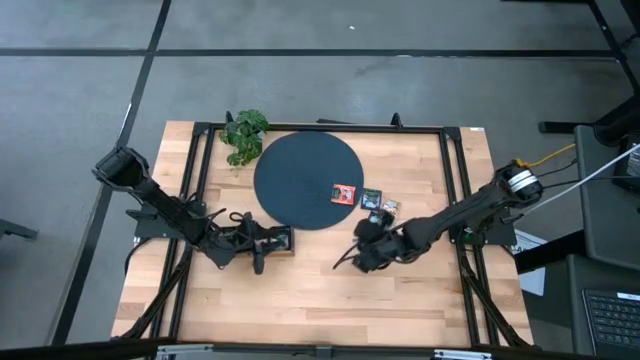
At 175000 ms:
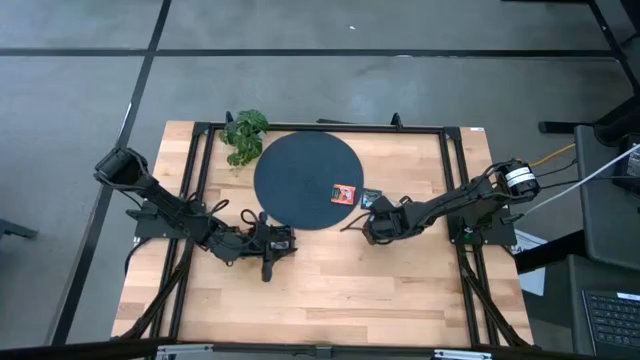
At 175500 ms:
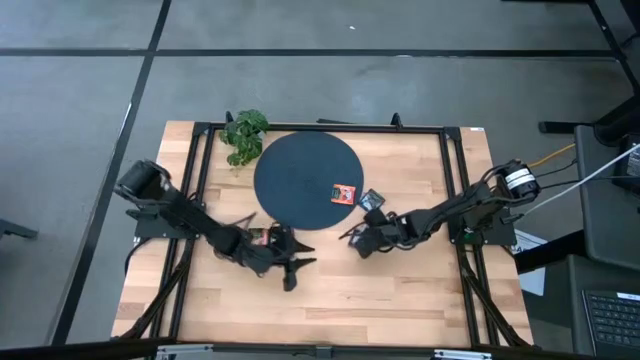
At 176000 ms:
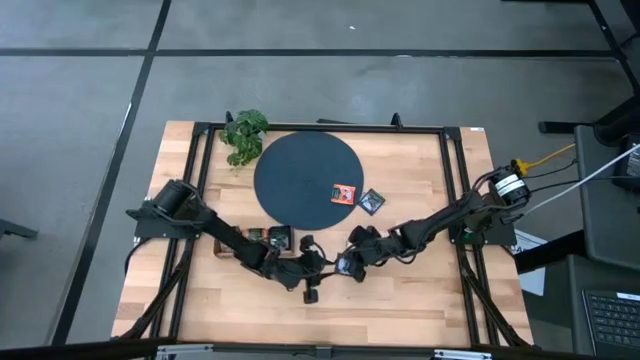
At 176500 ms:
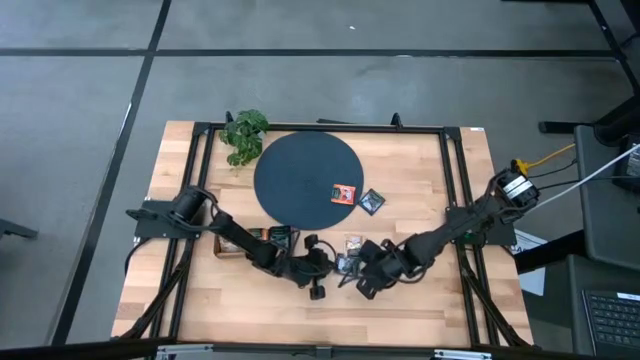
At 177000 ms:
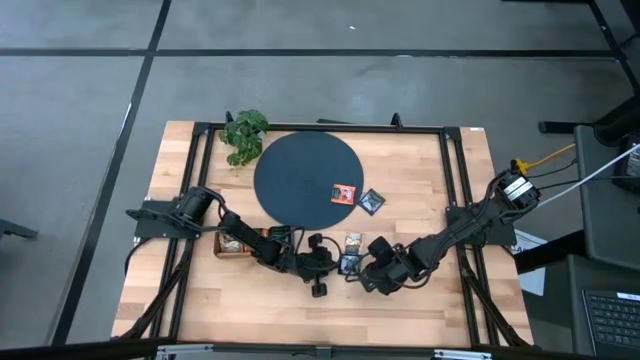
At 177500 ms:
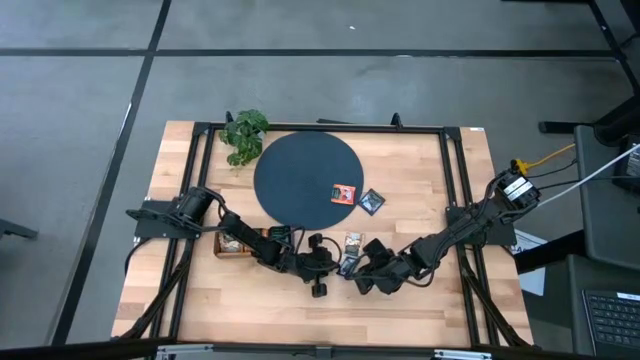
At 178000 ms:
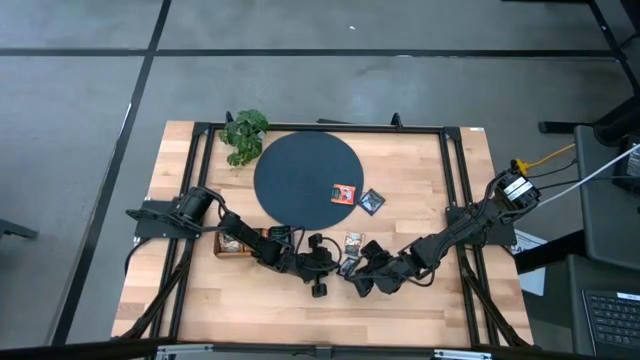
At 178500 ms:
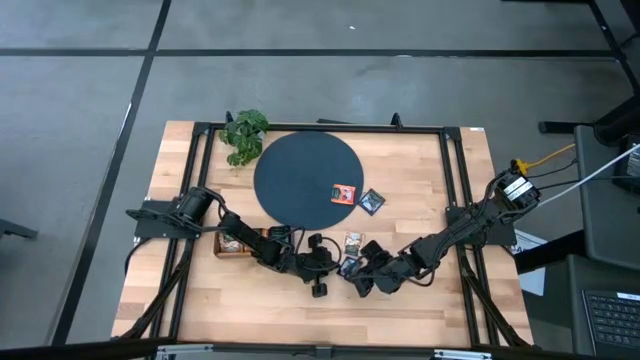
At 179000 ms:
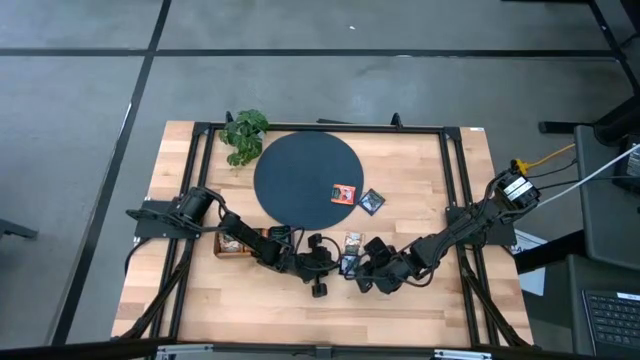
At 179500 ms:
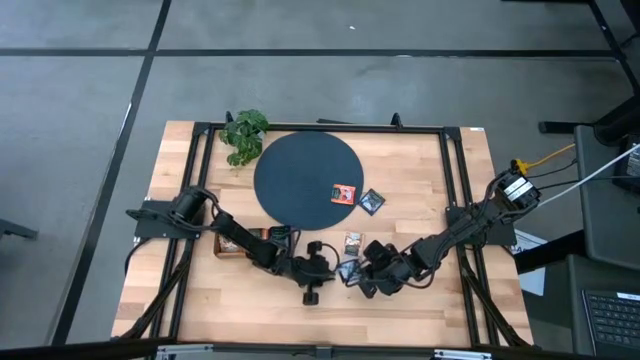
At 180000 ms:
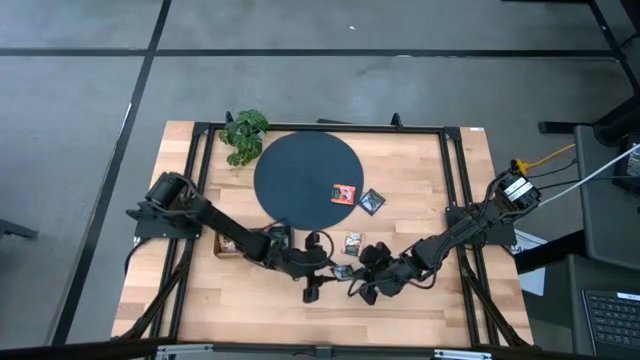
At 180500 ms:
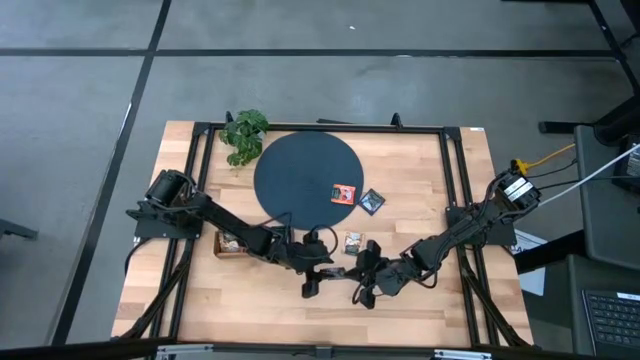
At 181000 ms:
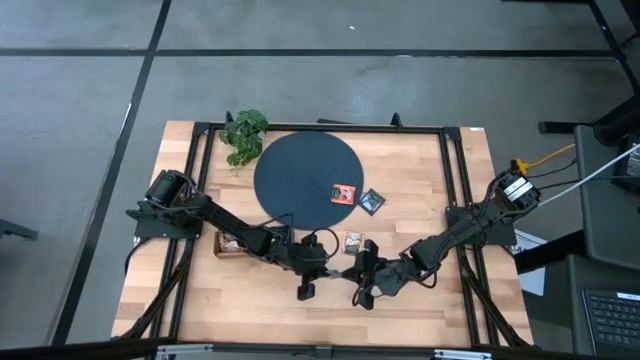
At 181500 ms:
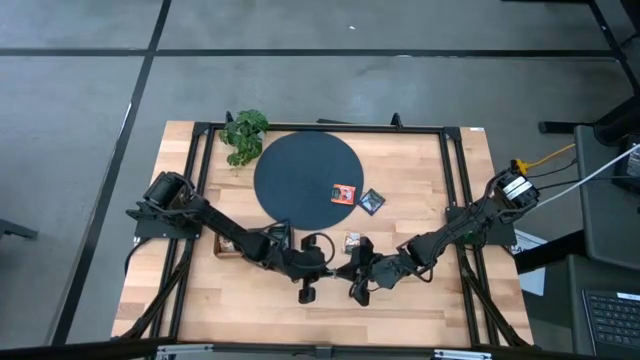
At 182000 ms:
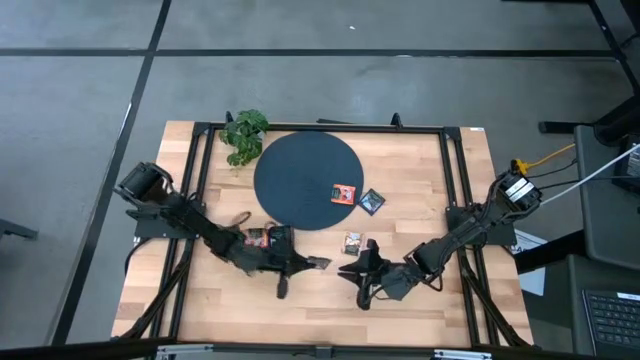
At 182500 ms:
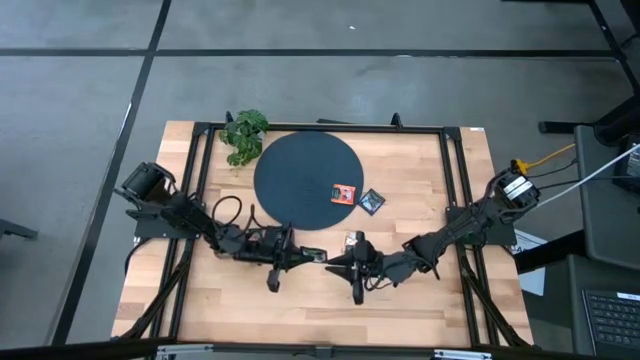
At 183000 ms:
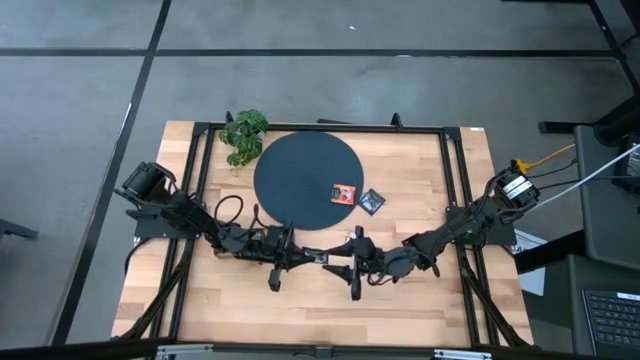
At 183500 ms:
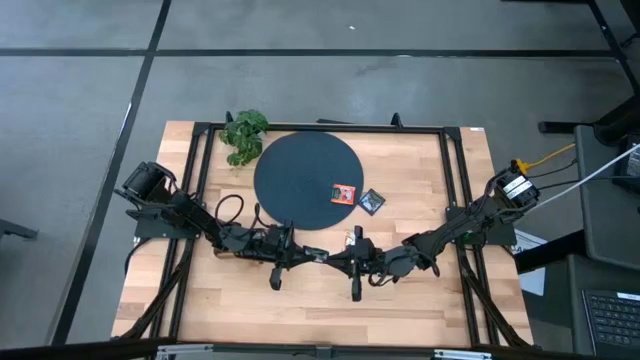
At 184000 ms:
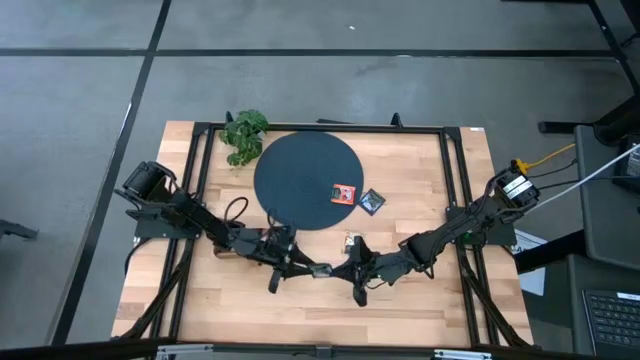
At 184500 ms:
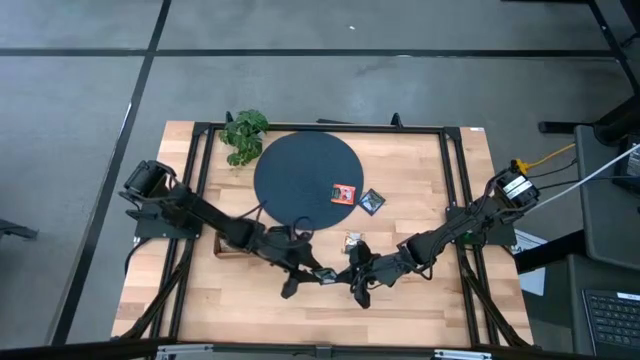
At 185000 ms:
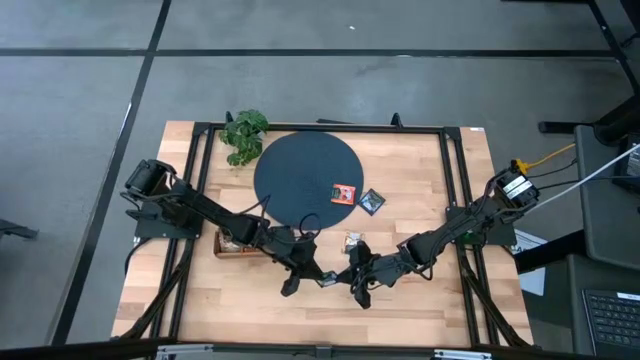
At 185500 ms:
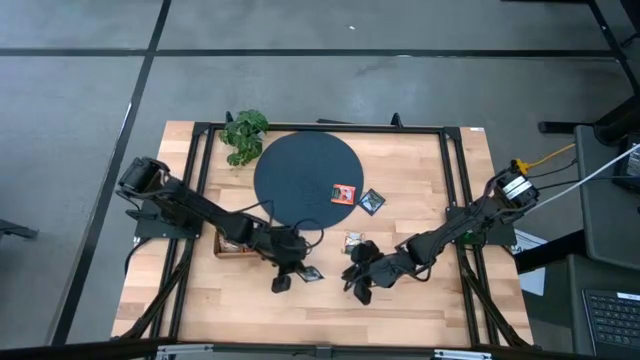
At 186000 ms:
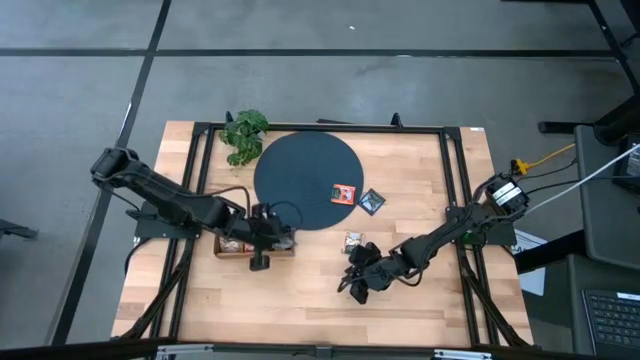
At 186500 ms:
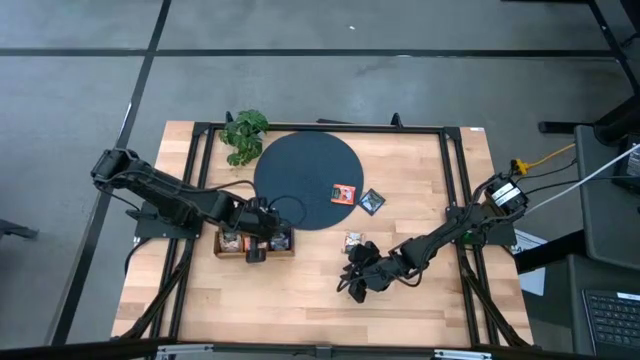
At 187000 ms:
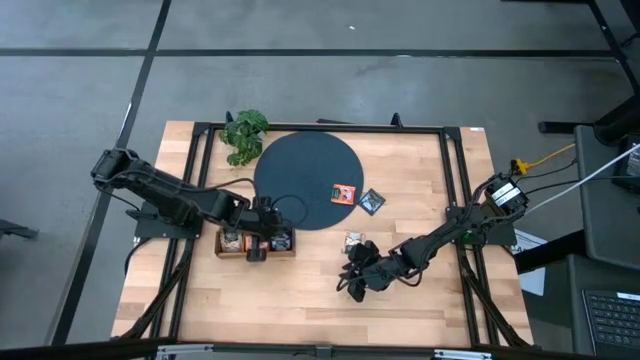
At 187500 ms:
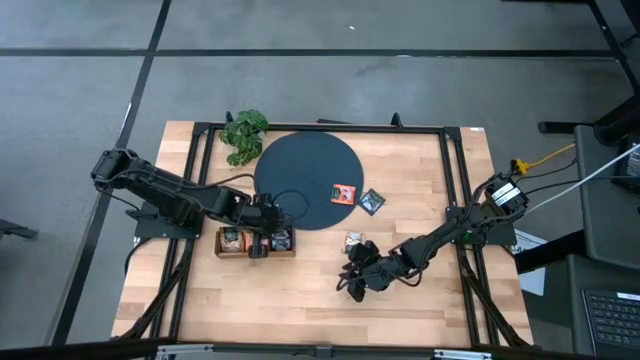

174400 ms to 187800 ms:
Task: Pick & Place Tea
Put the purple tea bag into the right section of the wooden organizer

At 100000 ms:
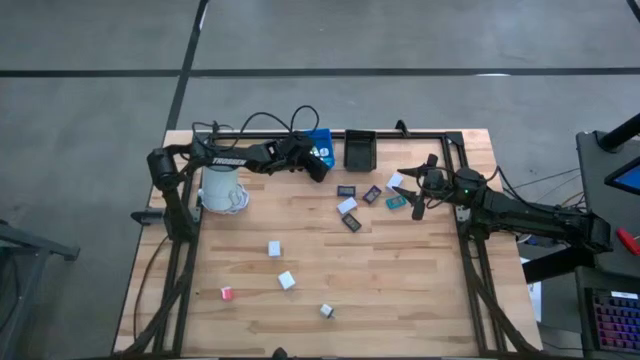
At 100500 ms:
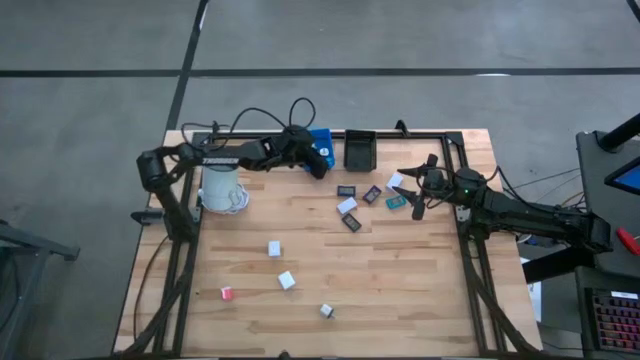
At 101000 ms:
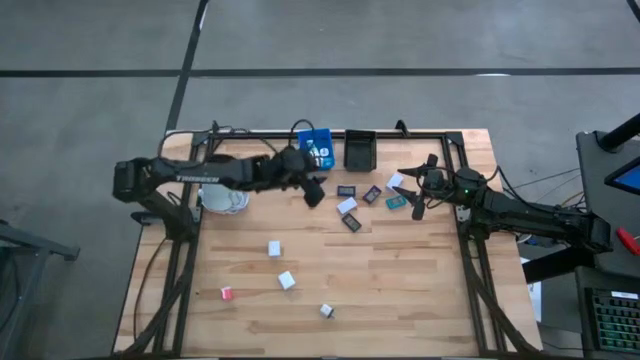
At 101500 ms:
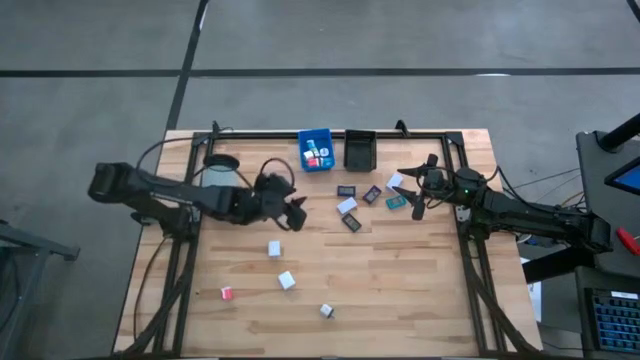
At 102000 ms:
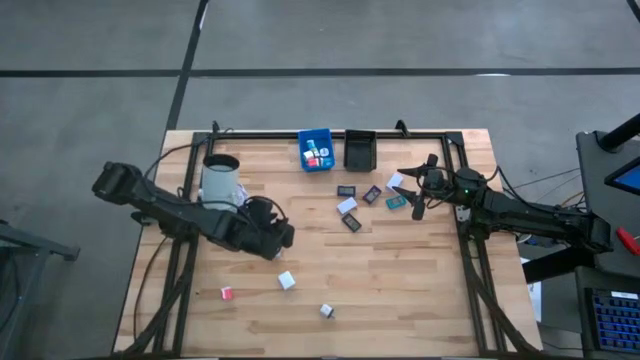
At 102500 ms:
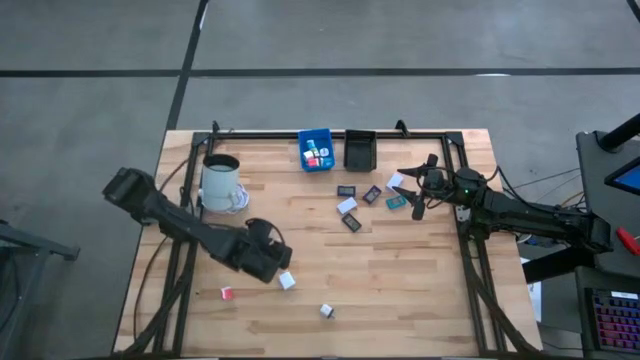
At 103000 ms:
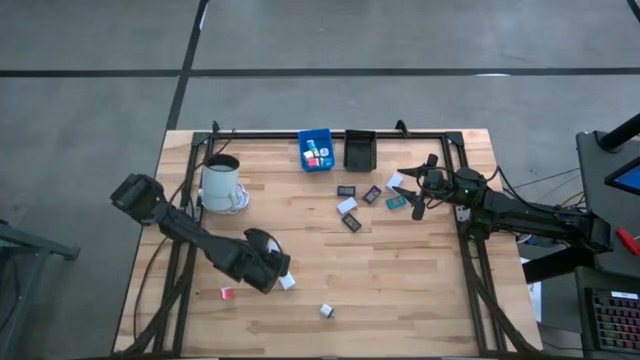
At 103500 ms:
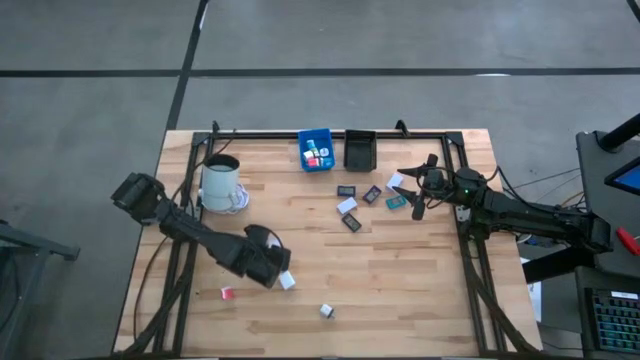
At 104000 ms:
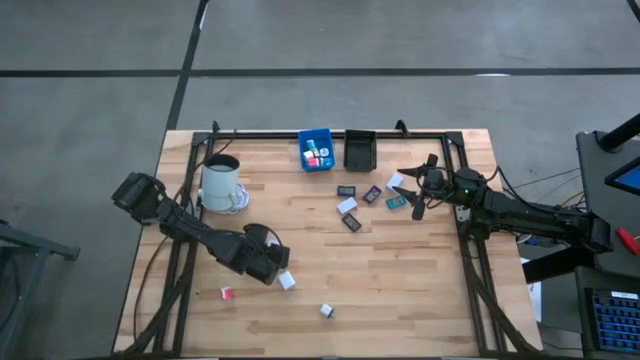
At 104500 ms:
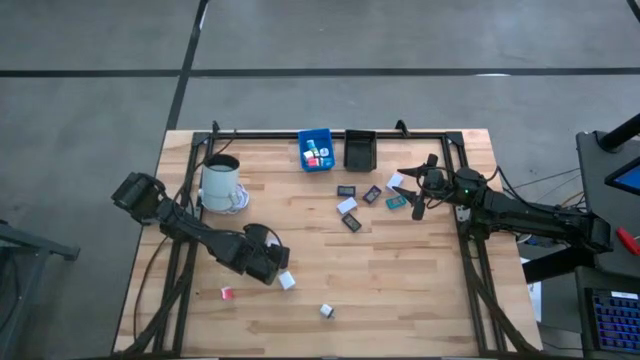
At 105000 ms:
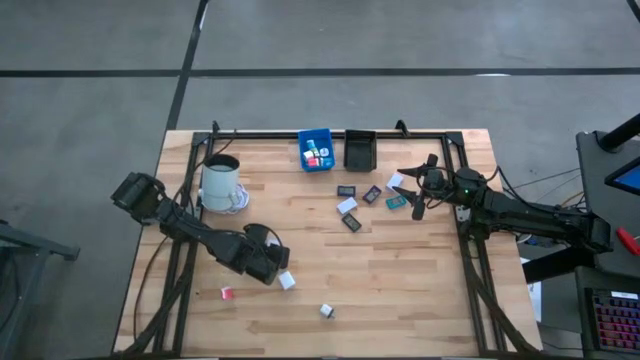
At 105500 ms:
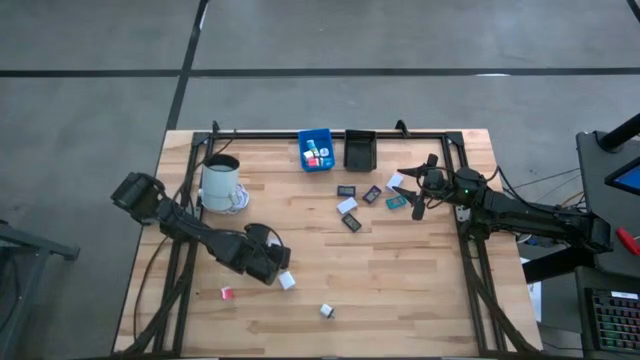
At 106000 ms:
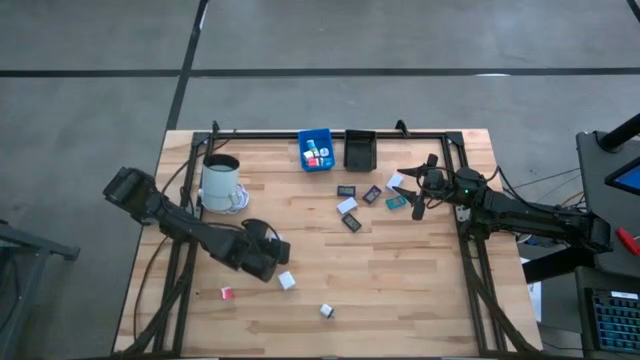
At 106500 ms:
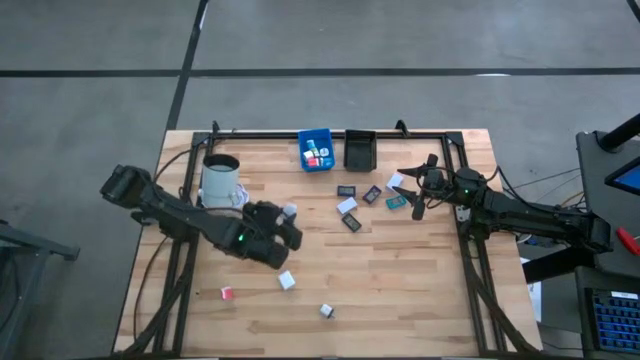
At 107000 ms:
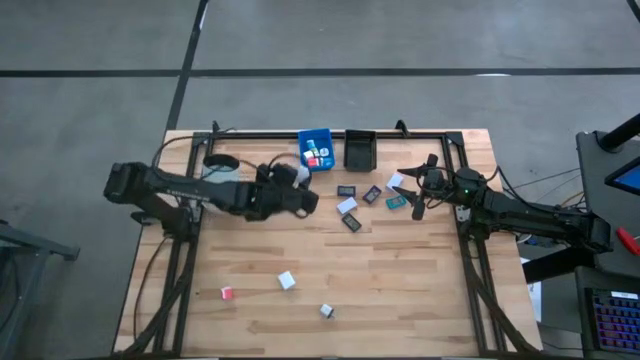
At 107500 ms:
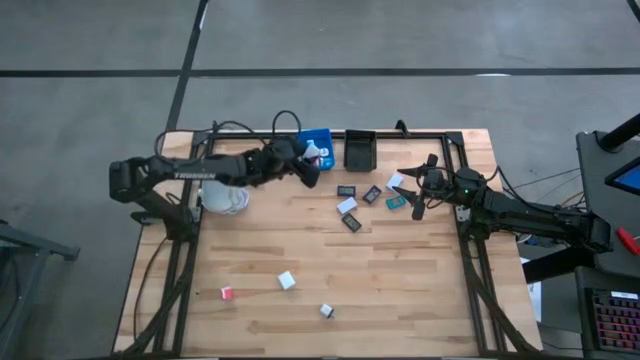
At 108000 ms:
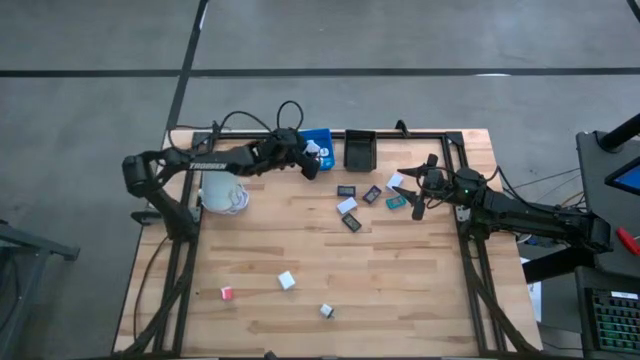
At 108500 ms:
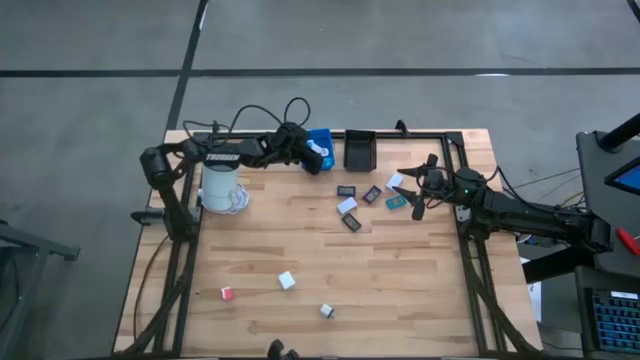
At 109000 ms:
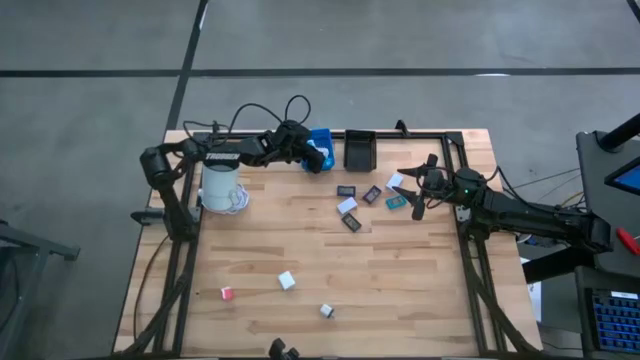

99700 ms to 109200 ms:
Task: Pick & Place Office items
Put the top big white adapter into the blue basket
